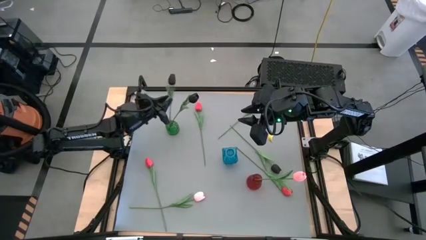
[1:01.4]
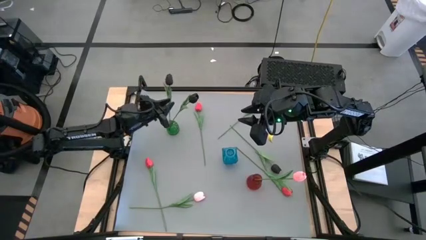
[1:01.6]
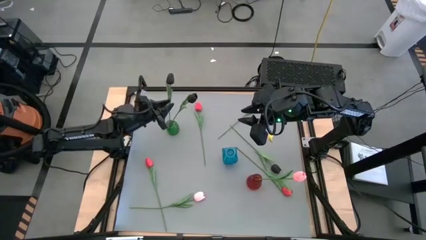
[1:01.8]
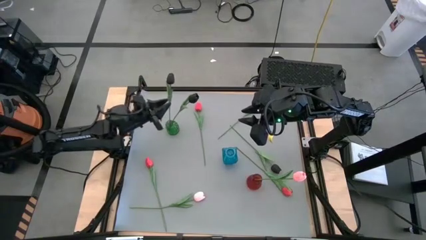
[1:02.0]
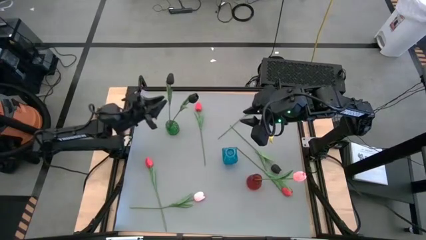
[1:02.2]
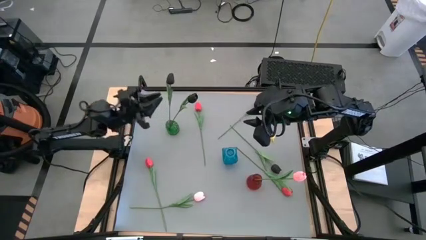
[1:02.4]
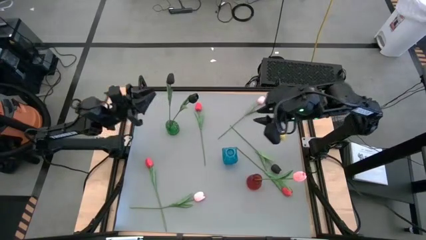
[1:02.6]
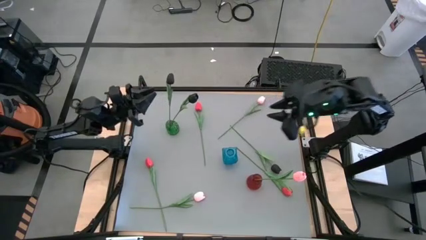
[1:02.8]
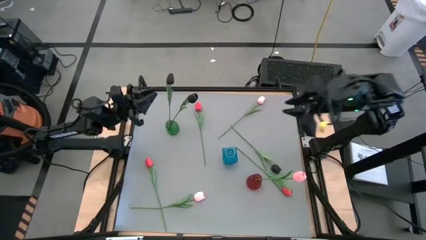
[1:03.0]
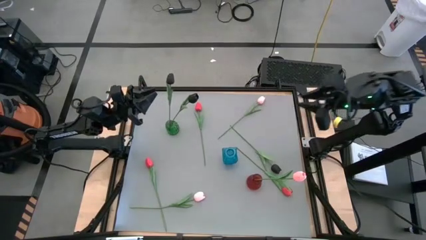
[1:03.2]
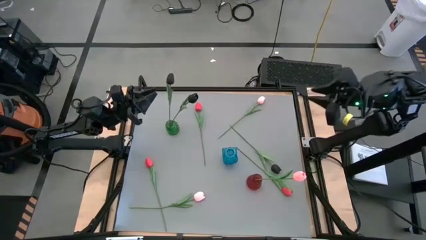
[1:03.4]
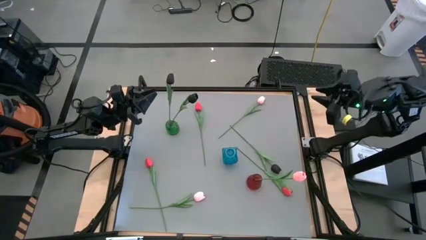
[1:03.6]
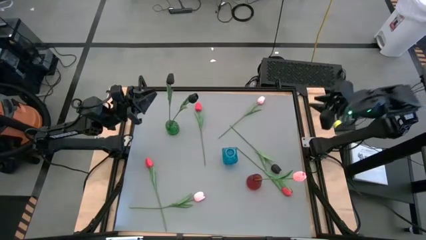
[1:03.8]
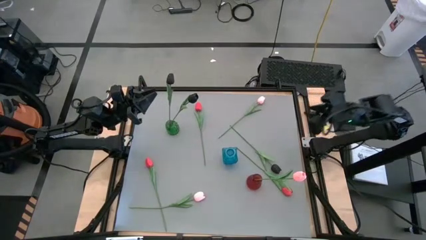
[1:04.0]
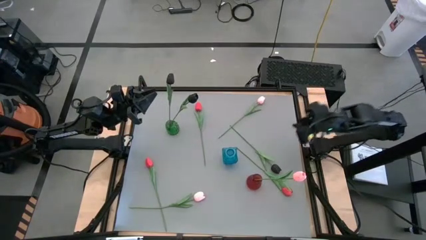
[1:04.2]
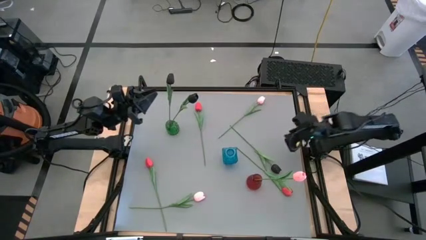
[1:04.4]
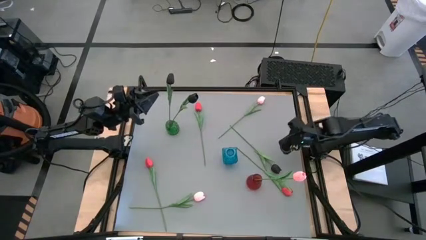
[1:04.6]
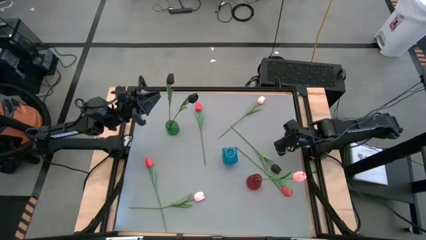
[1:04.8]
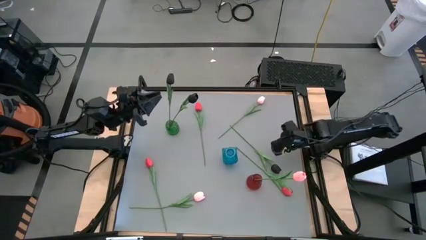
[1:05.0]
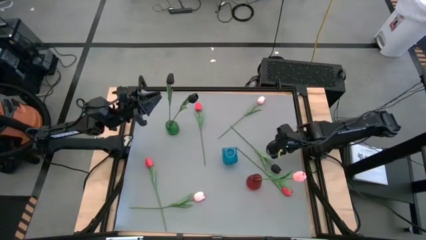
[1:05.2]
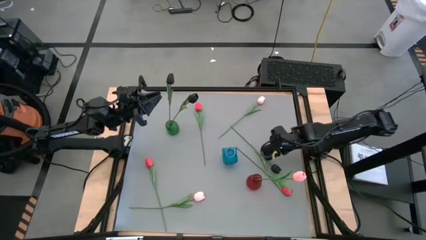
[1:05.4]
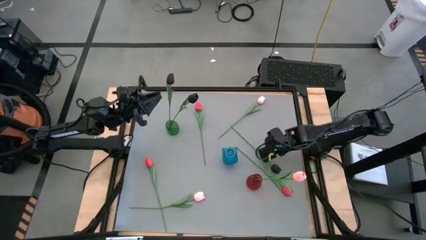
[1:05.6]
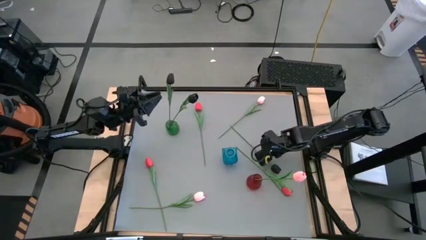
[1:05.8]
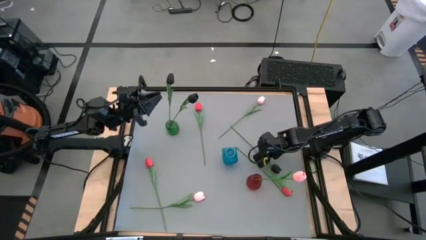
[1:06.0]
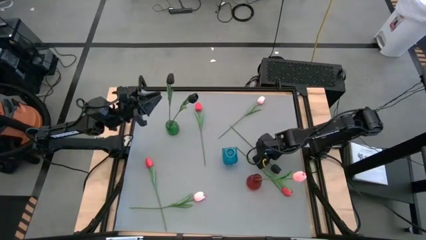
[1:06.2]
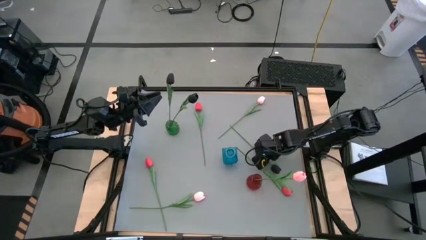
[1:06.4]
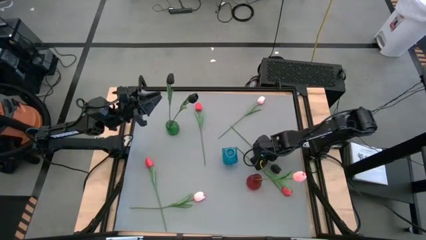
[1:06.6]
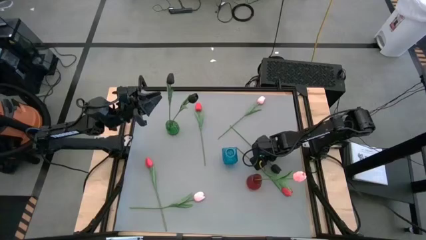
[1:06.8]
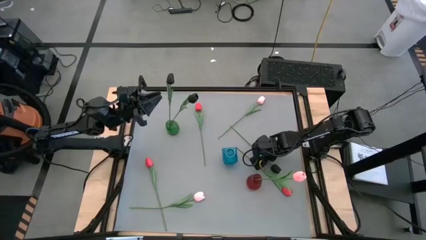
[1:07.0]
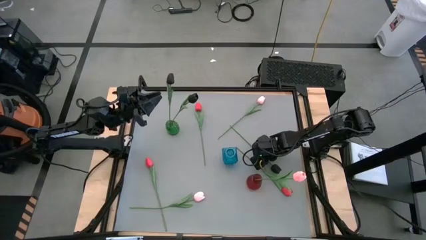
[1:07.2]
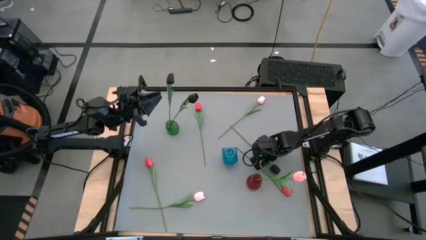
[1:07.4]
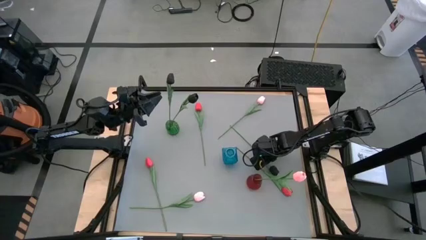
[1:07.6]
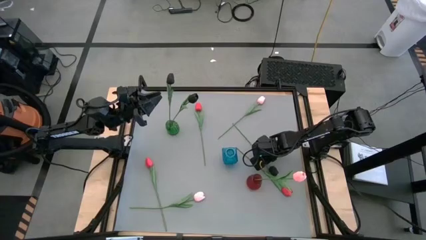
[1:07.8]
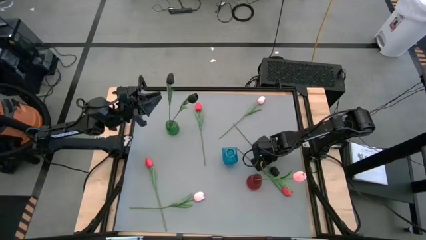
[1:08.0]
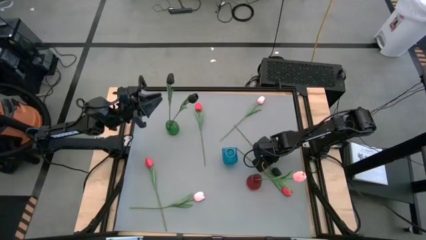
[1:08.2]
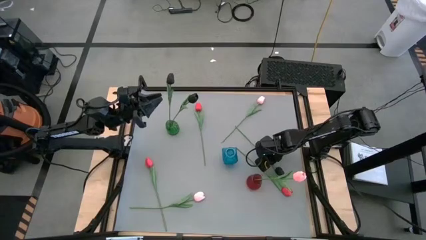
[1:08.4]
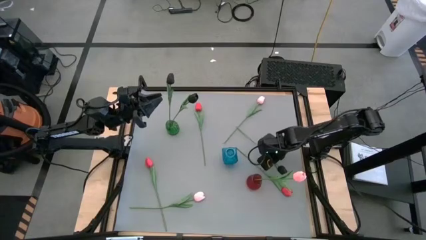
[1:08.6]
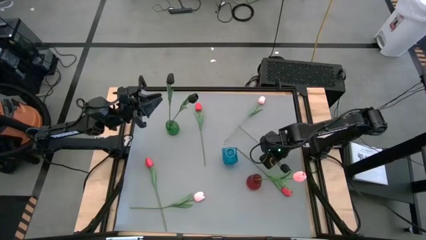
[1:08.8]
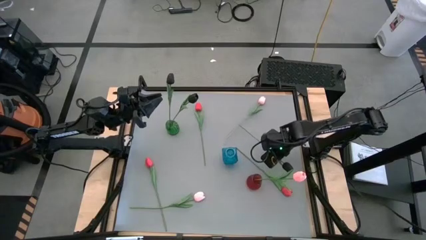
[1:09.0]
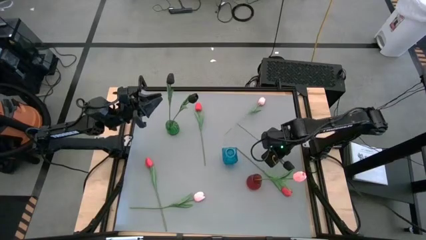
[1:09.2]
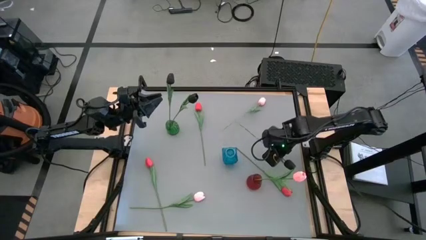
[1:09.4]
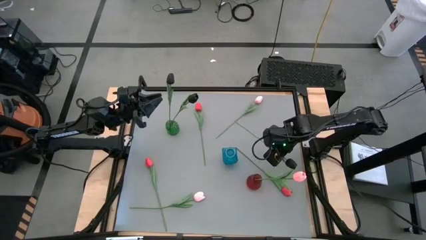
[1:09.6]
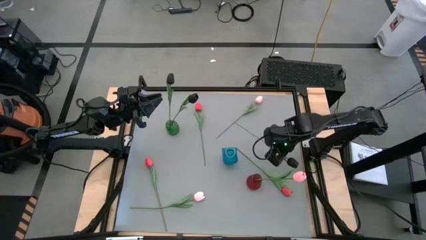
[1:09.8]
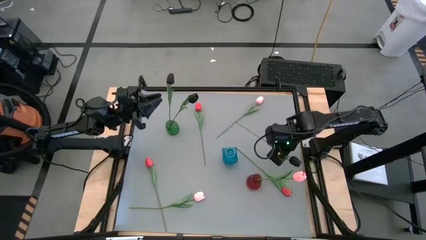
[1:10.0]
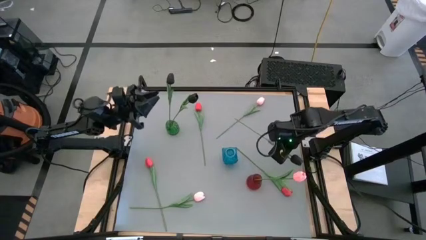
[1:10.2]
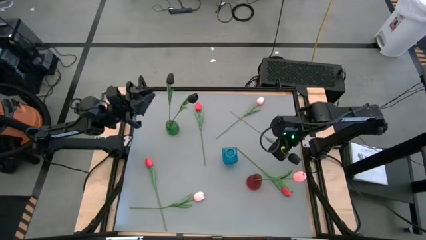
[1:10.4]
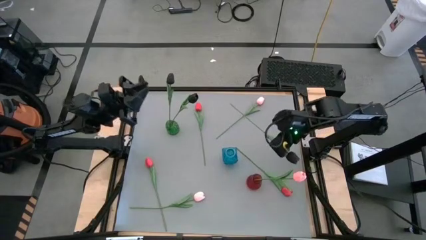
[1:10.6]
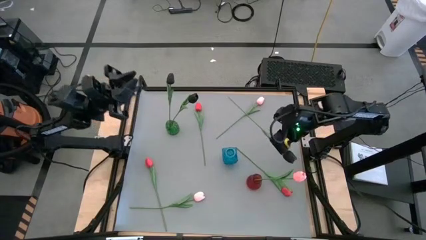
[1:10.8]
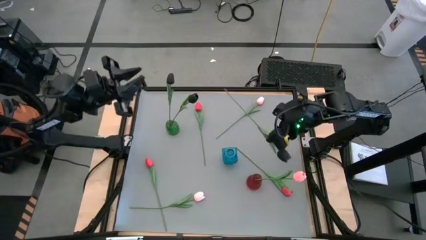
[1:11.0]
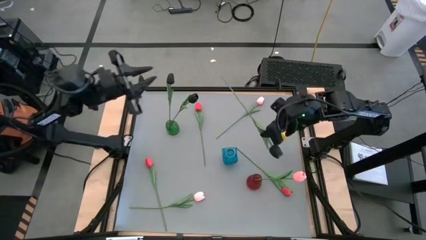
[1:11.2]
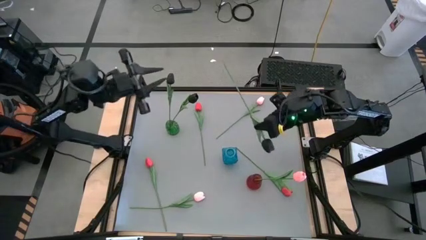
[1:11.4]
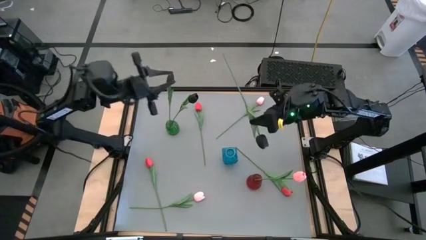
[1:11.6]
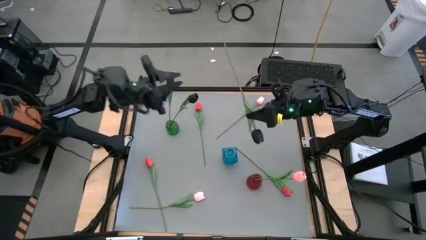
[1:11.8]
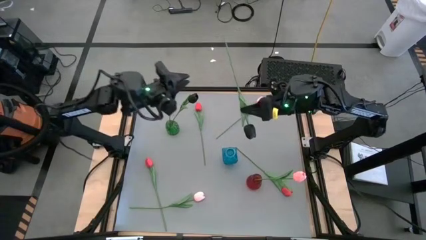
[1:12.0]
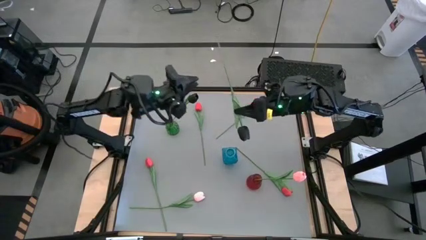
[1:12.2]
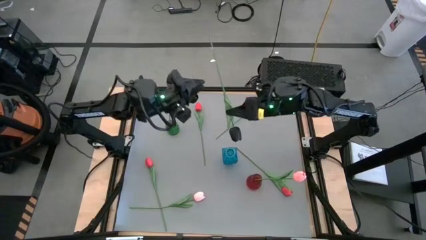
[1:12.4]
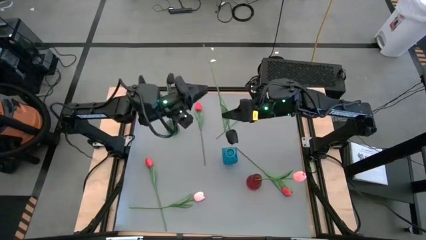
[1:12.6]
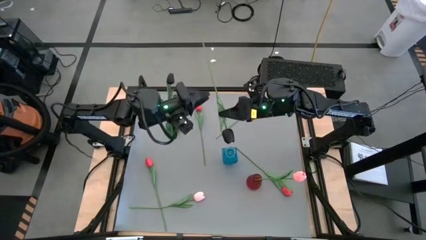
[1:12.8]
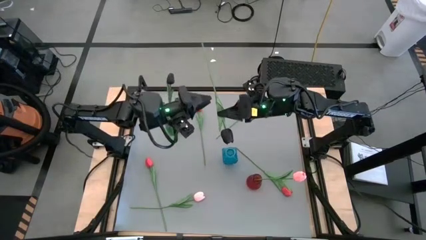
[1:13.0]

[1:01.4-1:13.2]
Task: Sort flowers into vase by color
Put the black tulip into the green vase
